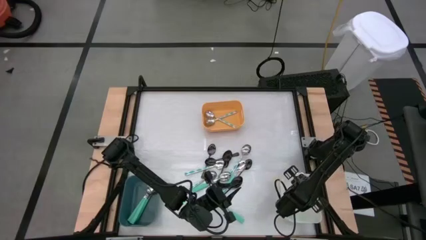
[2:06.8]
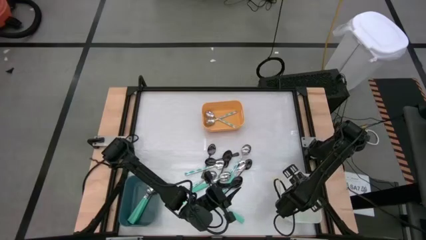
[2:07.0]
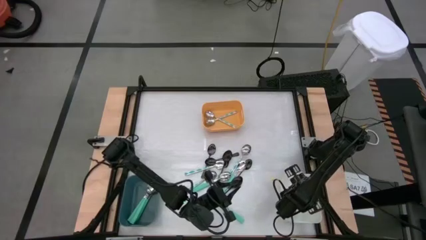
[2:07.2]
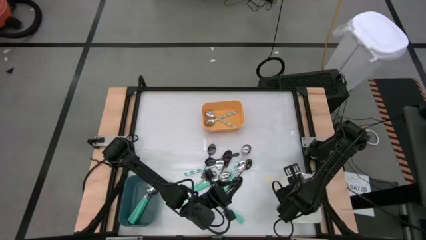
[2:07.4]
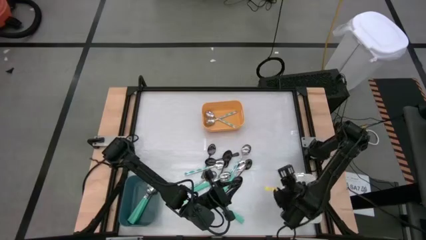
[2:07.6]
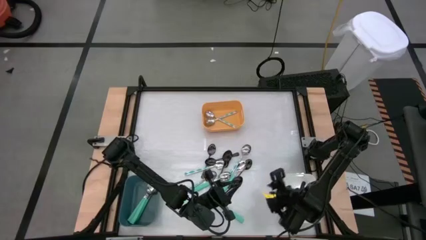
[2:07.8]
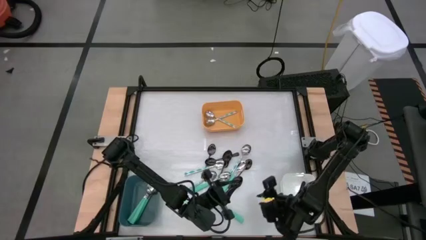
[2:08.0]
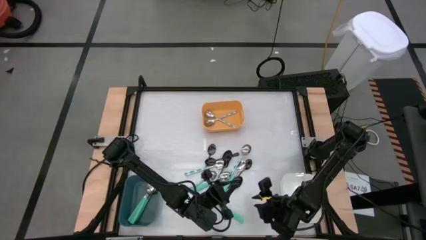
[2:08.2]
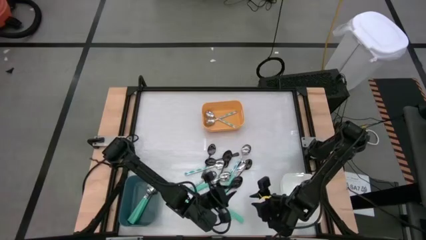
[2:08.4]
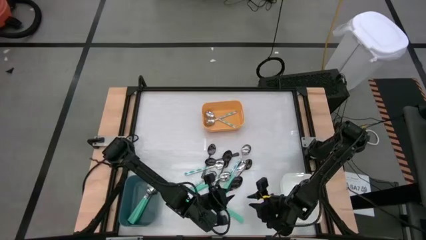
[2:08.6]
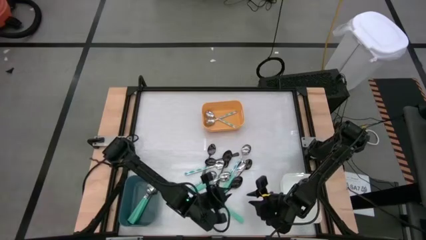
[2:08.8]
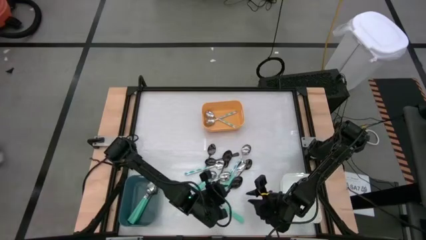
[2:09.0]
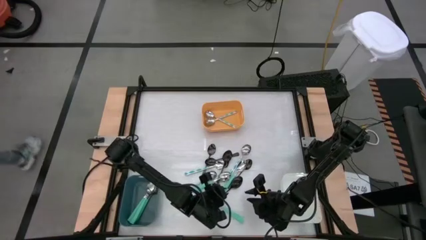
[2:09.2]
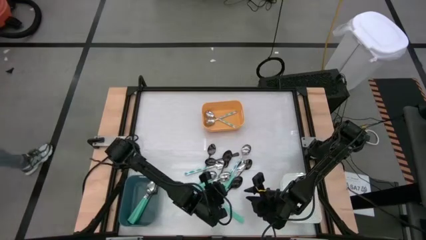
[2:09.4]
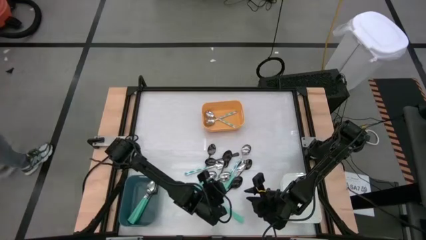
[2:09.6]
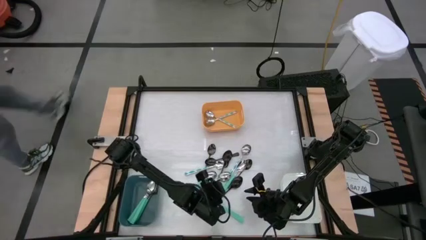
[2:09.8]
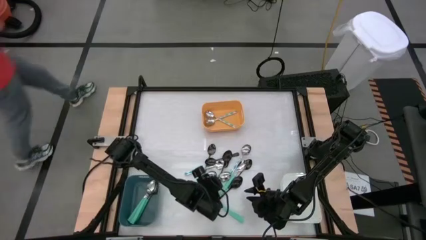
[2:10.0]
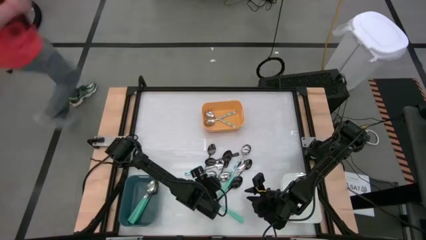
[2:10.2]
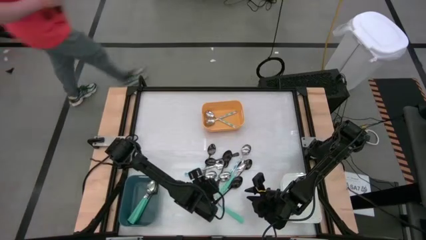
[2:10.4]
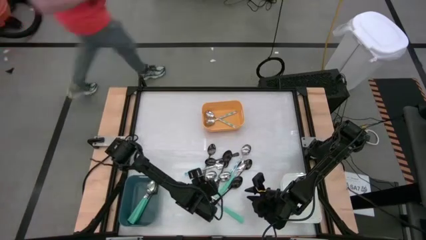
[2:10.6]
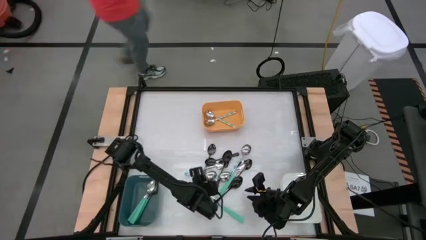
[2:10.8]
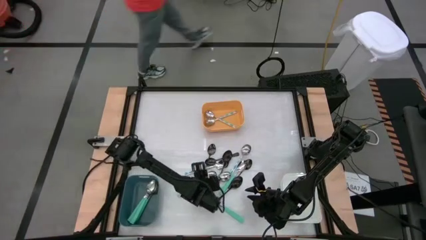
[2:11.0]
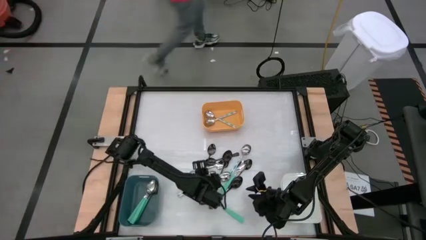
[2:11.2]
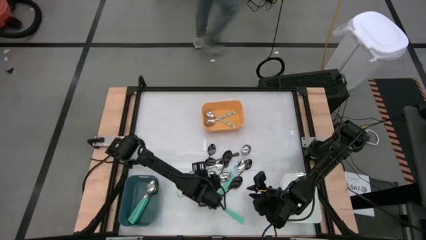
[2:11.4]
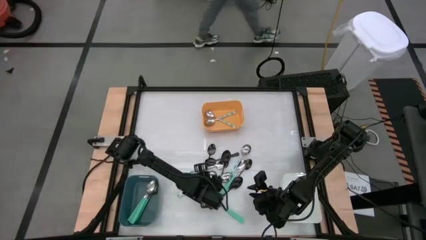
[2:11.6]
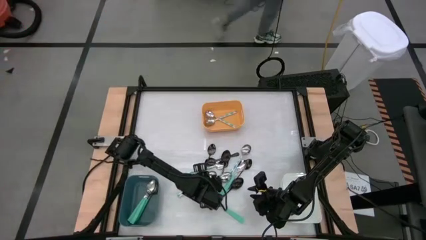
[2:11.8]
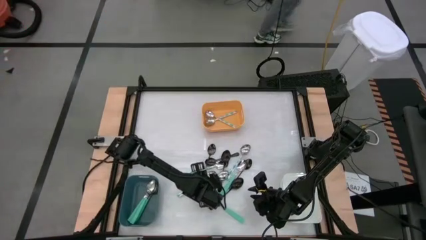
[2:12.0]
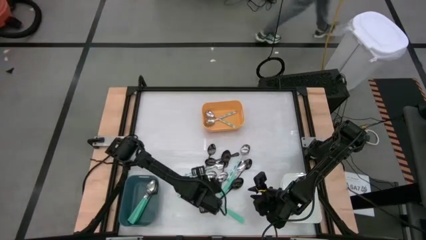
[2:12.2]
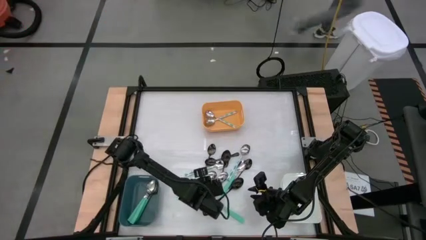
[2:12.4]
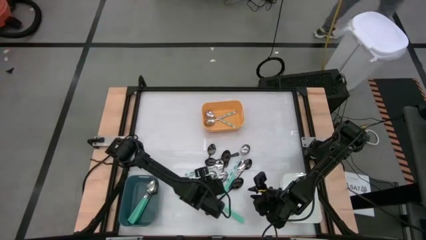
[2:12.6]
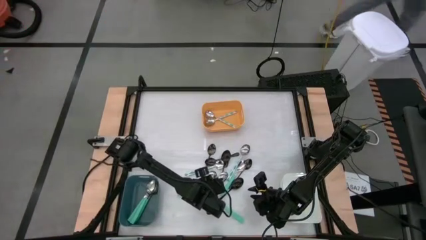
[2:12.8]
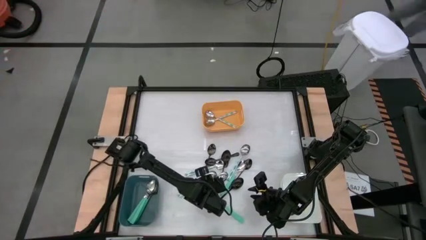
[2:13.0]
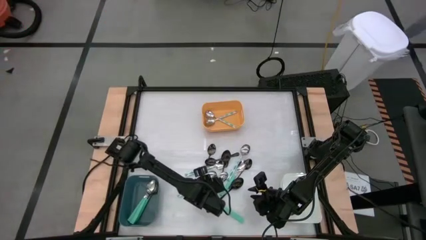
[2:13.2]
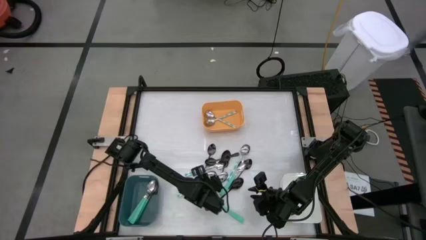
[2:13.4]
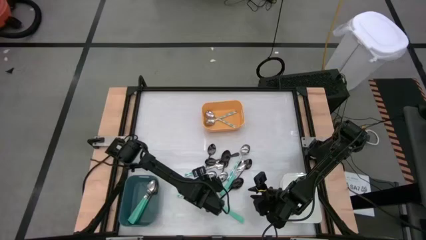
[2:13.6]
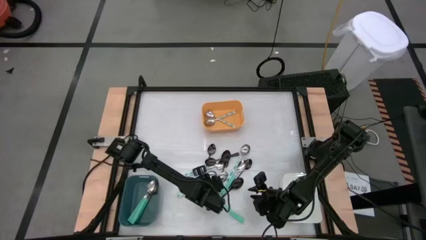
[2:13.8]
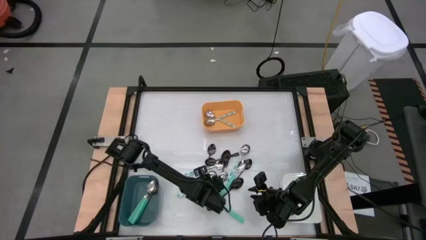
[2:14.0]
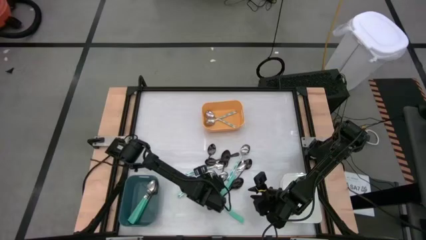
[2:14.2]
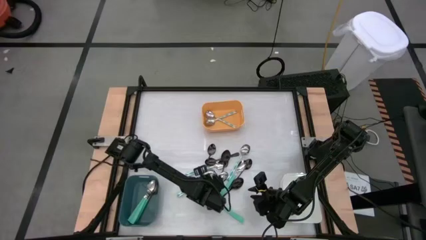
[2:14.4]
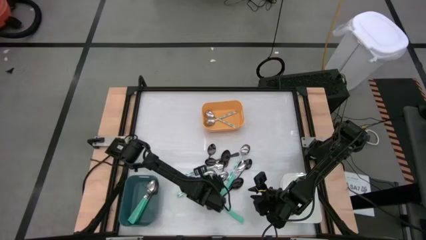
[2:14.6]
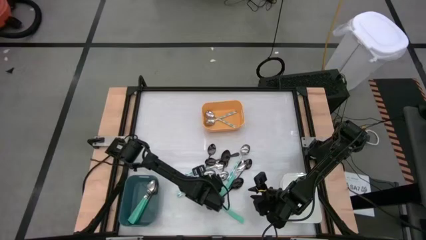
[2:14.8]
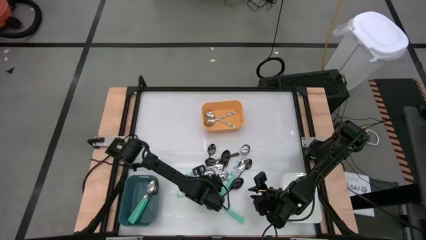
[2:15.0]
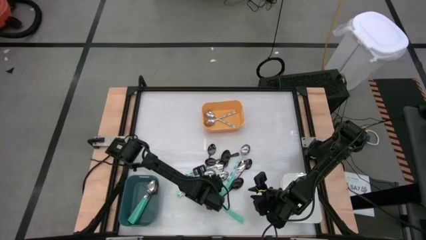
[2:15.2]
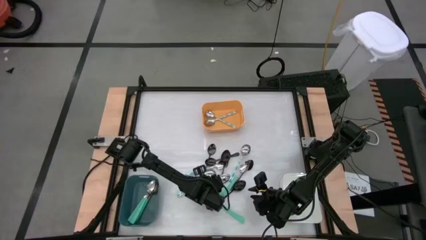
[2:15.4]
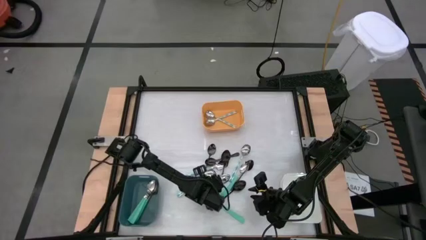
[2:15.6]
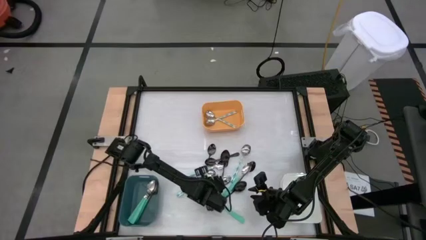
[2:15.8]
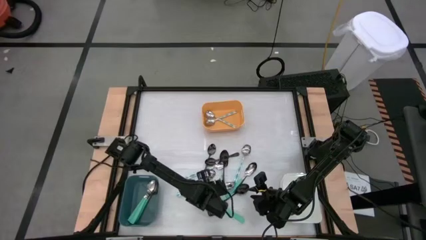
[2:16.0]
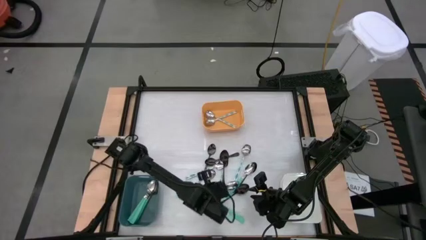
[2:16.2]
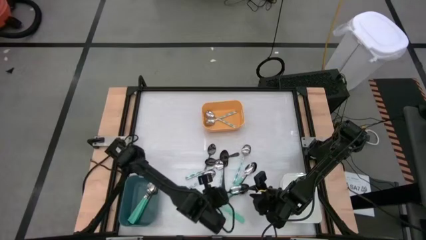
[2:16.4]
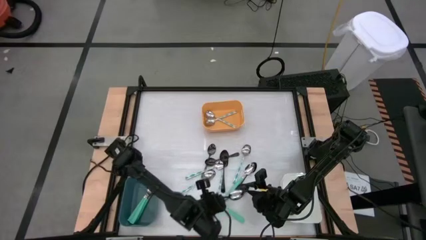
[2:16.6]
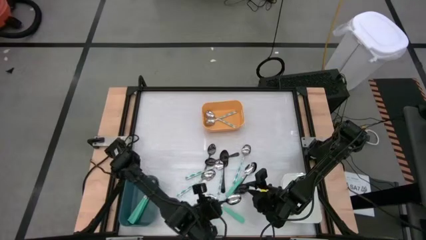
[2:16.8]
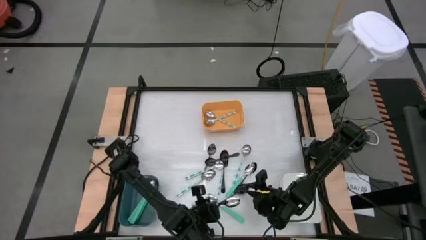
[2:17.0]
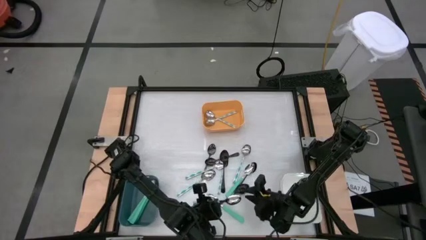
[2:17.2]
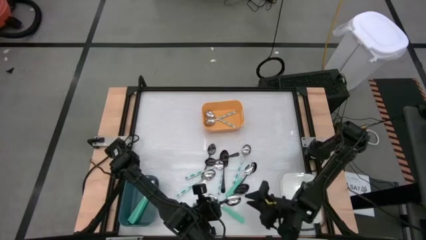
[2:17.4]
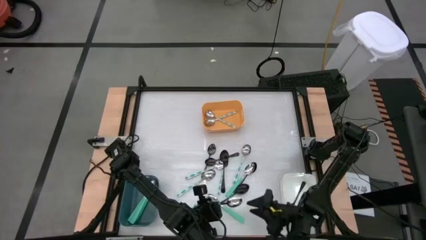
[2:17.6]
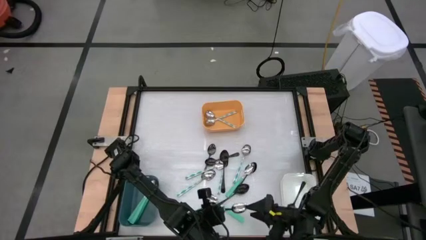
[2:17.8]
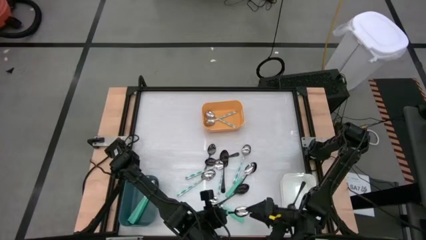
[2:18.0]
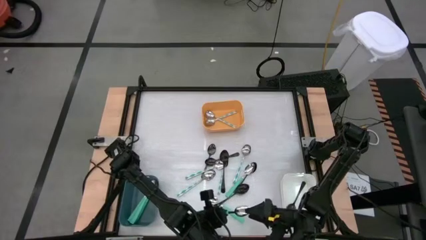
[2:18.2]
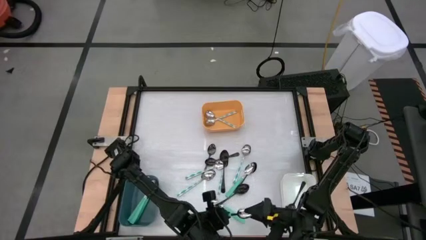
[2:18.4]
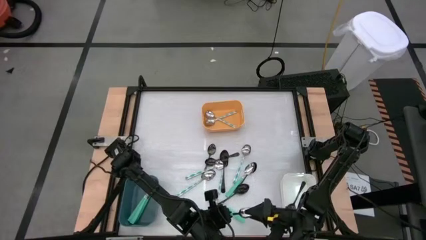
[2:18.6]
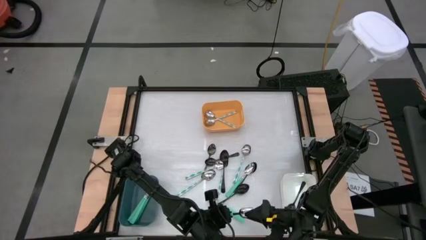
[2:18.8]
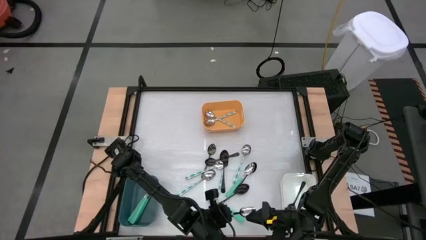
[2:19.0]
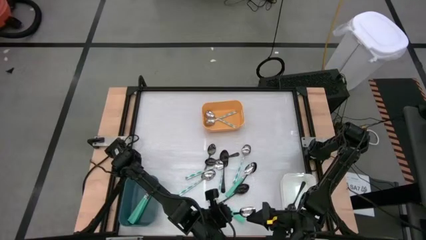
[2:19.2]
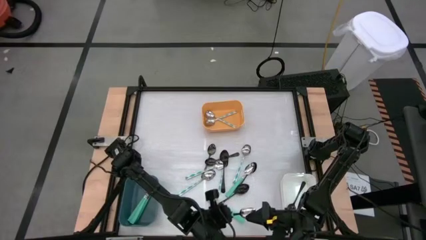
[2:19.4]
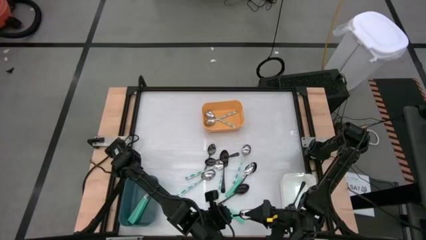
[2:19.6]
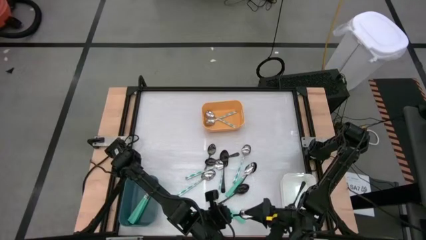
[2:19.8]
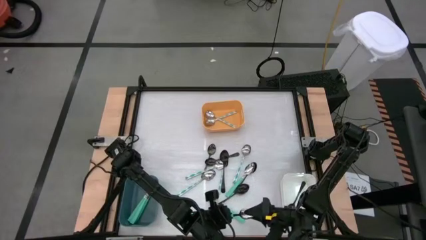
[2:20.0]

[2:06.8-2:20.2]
Task: Sort silverware by color (type)
Put the green spoon into the blue bin
